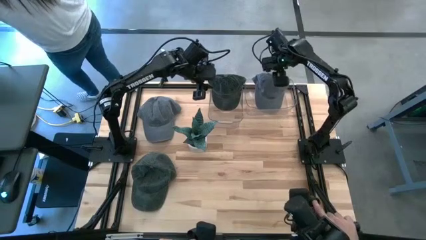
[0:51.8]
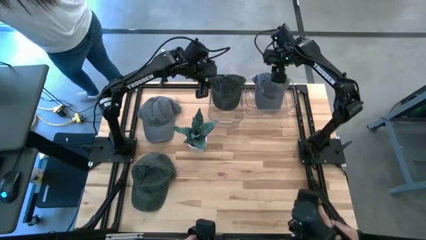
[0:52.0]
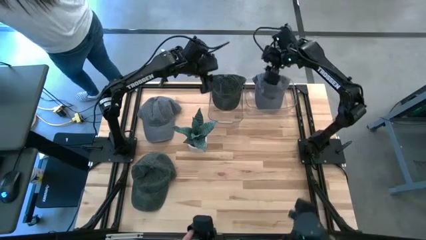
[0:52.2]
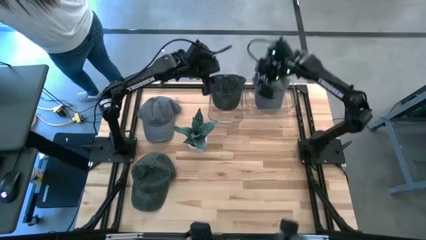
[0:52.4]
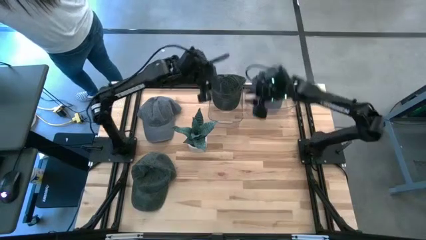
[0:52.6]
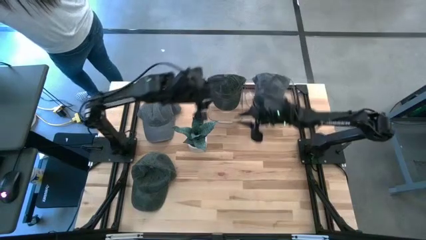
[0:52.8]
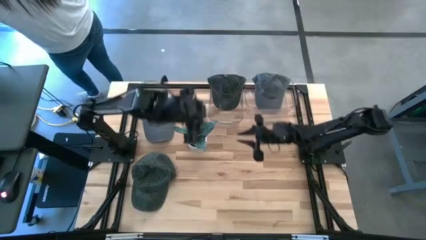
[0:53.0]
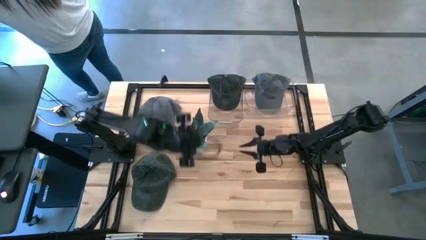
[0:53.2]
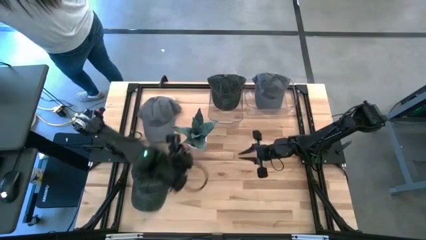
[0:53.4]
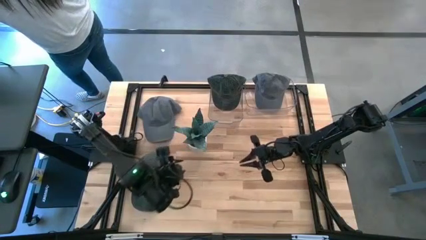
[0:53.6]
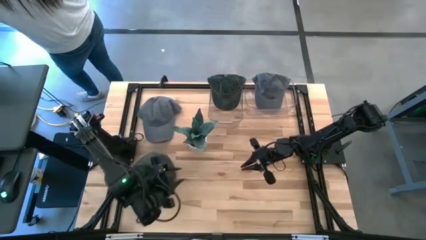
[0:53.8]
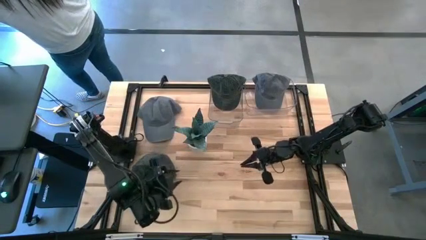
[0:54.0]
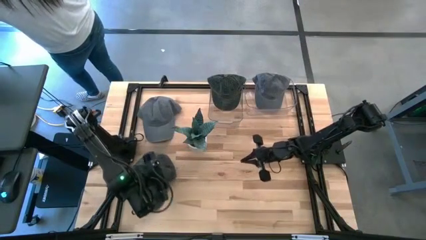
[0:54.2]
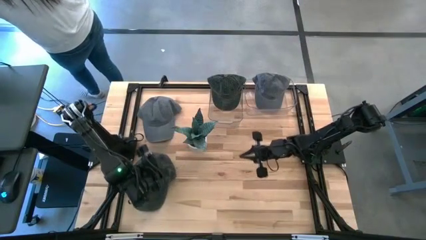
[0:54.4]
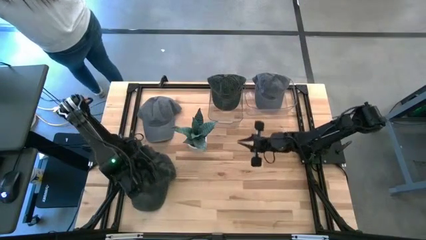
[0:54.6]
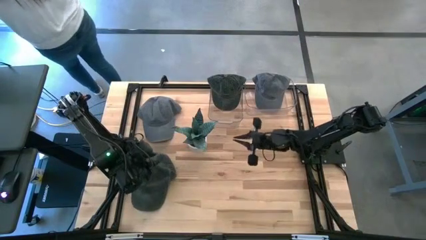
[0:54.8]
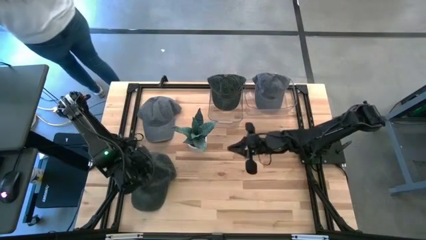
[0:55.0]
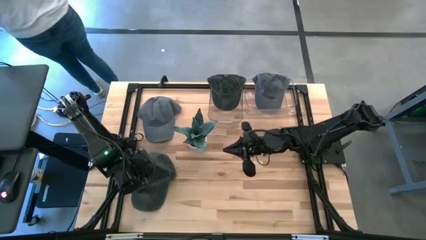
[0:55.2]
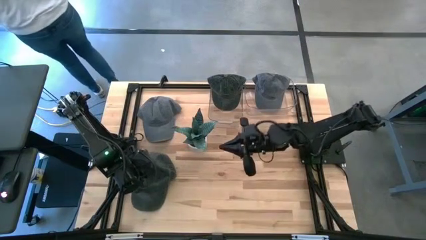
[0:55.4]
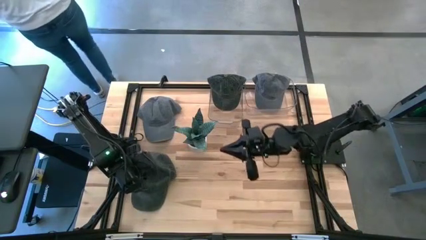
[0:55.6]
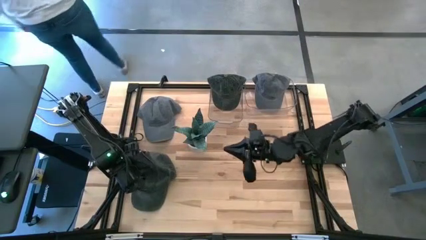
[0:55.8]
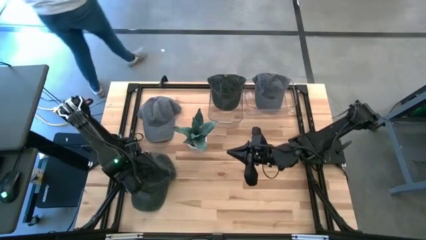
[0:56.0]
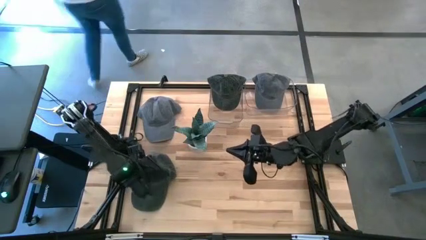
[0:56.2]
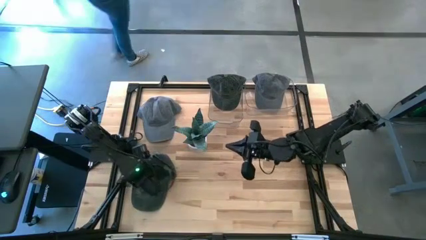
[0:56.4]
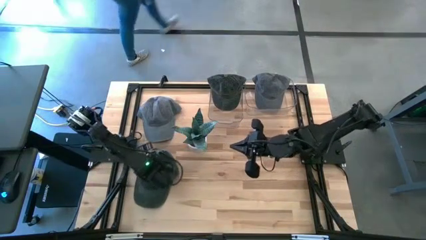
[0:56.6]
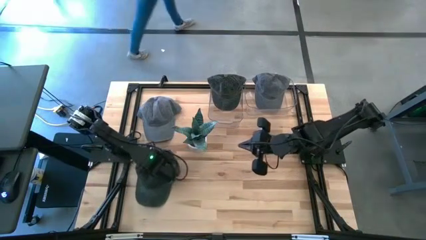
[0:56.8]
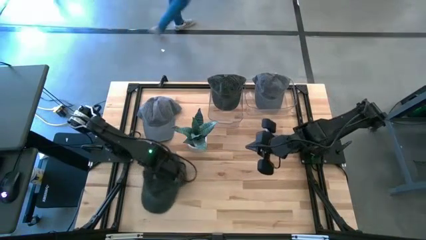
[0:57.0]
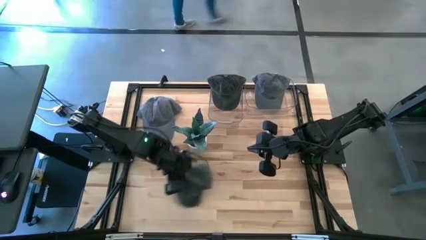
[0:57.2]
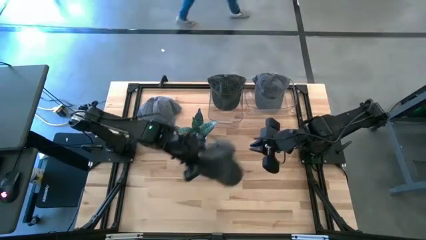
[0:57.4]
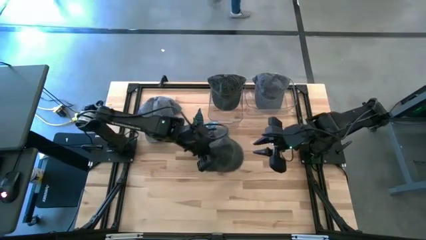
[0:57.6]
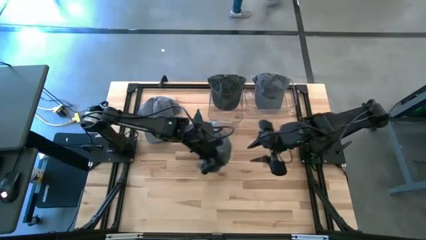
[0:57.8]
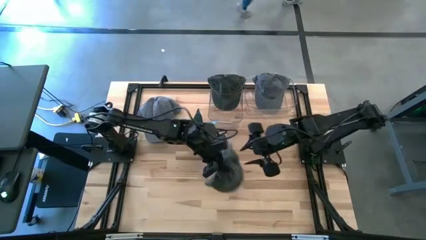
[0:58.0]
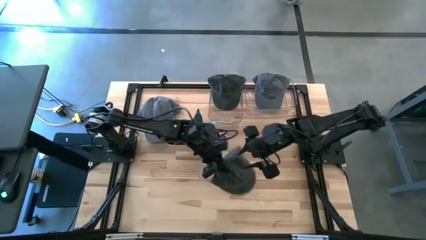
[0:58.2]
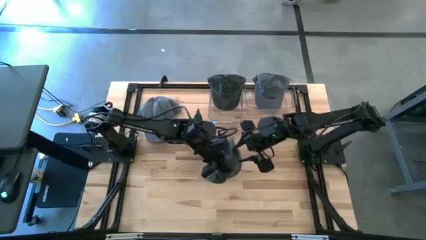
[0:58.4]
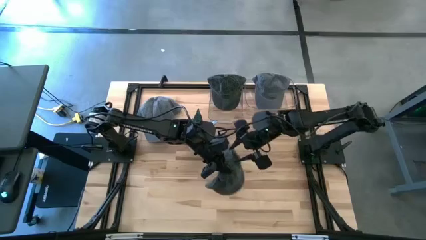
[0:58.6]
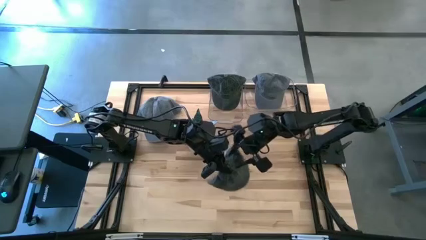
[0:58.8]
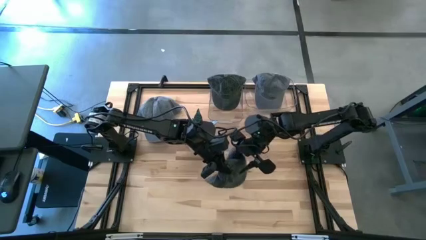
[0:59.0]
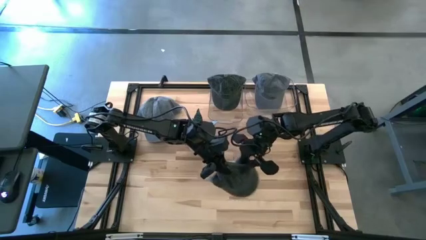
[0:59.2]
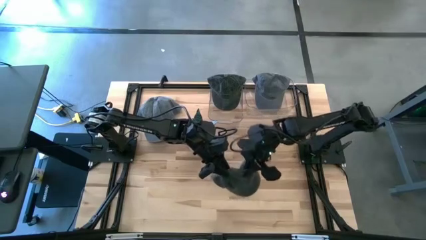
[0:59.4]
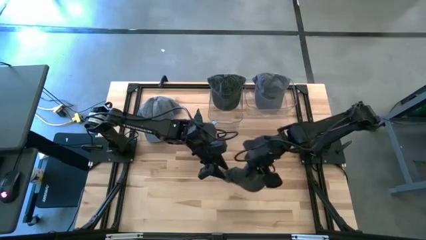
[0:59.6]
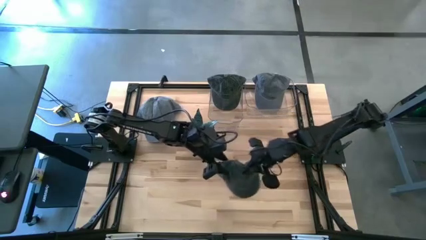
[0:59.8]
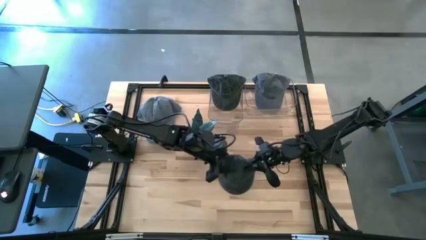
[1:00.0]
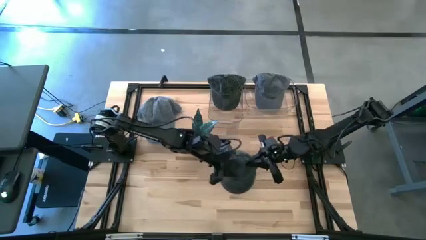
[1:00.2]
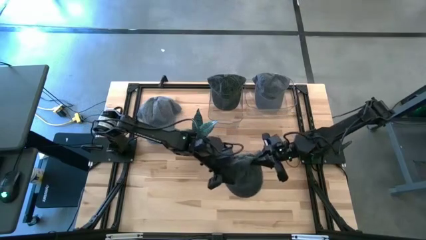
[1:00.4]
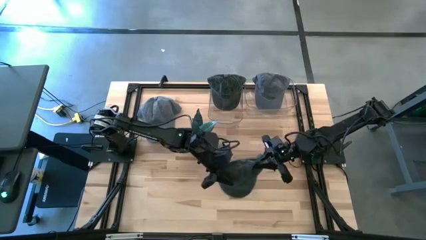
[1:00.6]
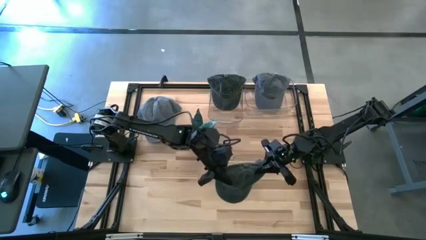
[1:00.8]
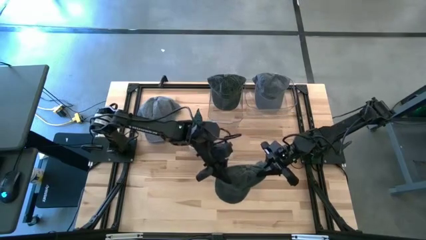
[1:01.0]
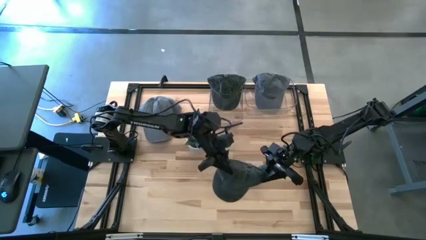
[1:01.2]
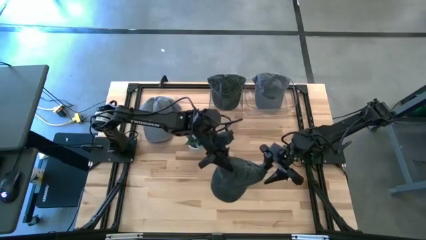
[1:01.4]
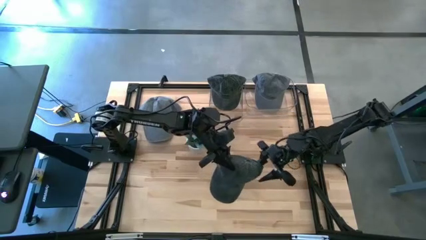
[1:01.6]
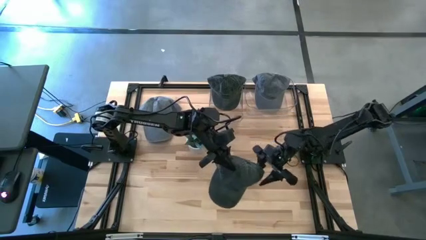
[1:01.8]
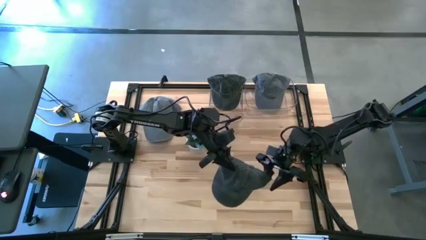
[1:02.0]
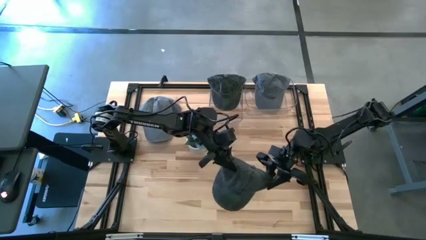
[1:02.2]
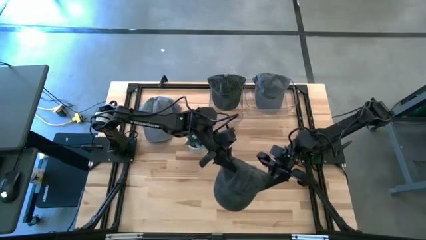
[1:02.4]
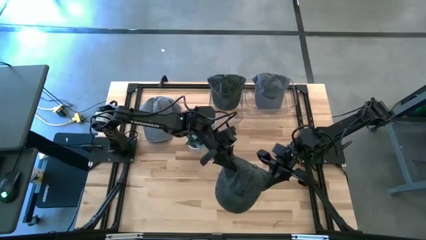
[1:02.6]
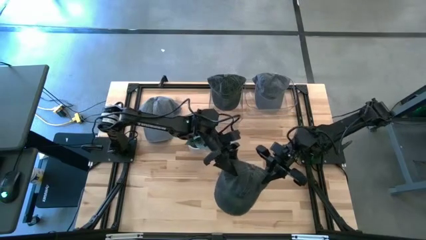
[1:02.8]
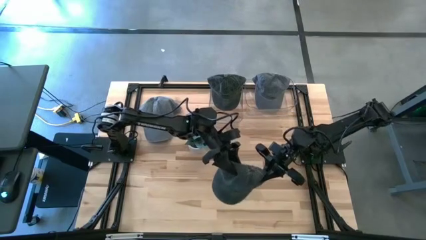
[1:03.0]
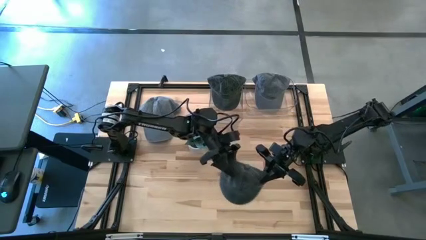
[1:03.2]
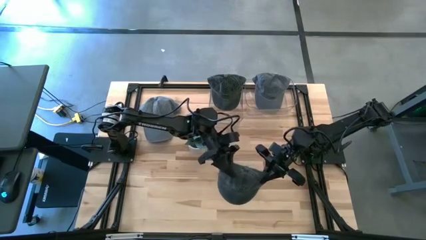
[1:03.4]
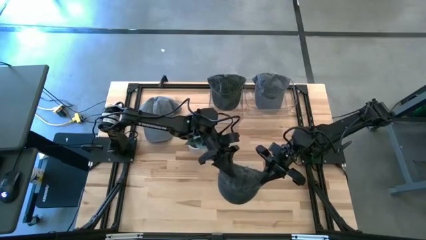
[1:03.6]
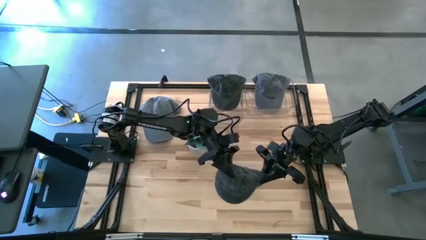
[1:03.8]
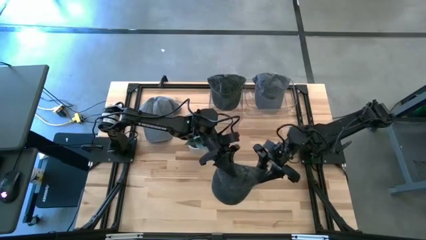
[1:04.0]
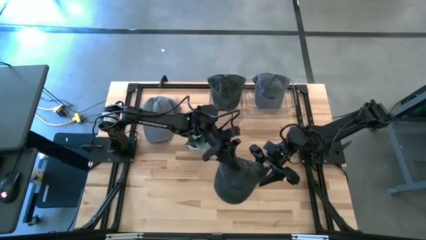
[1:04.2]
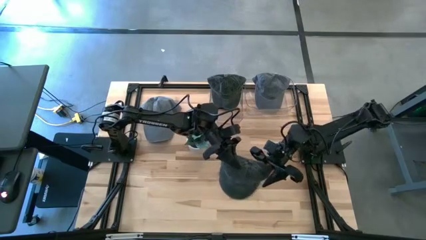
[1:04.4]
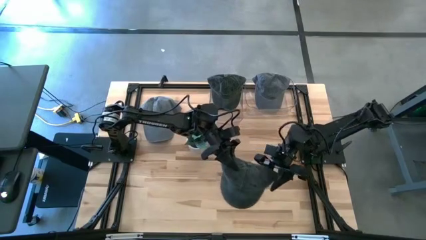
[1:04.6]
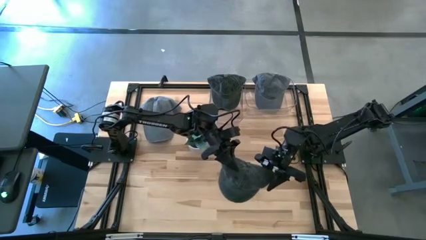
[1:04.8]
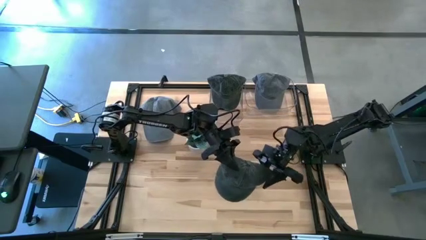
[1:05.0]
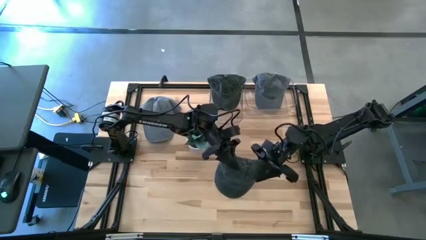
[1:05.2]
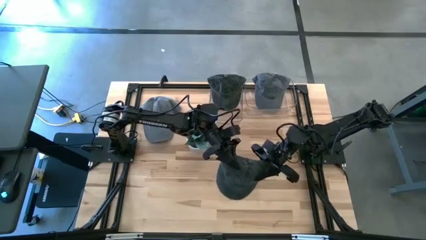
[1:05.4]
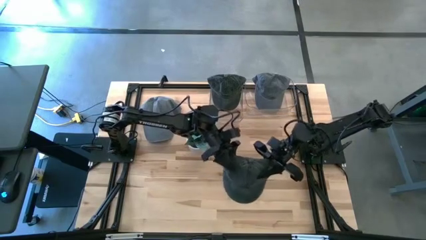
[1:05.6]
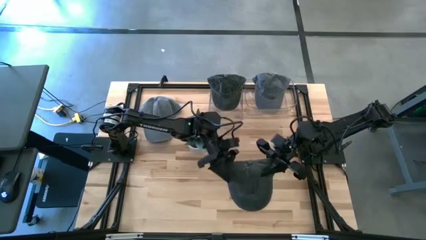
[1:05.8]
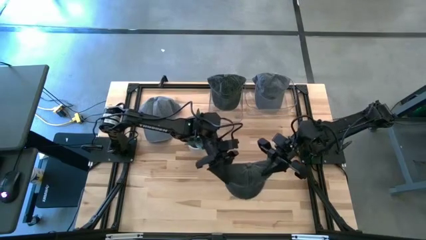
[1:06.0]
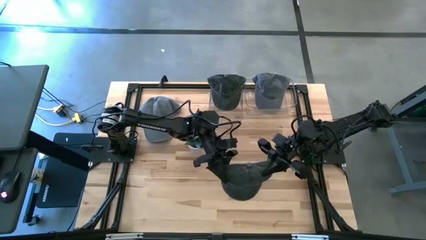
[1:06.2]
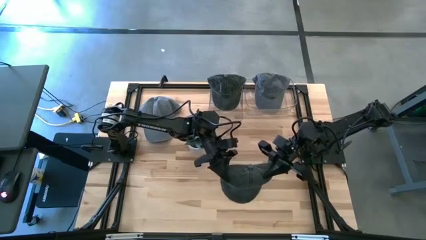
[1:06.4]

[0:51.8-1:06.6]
Task: Pick & Place hat
Put the green cap into the left transparent bin
